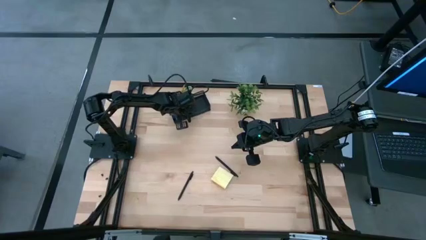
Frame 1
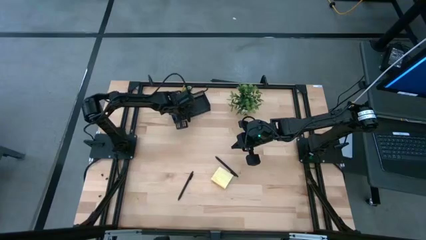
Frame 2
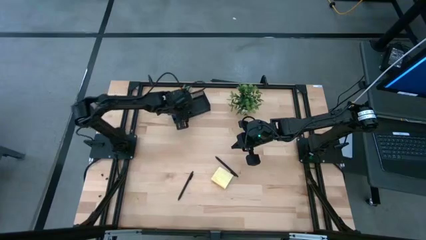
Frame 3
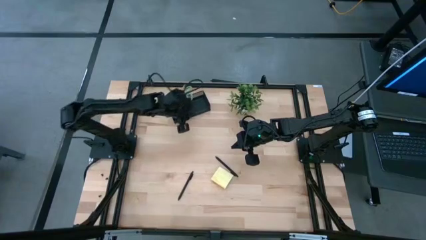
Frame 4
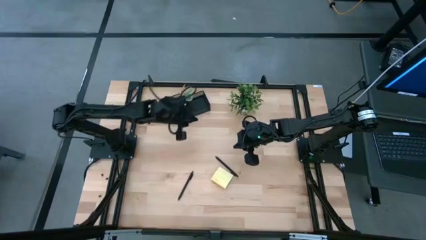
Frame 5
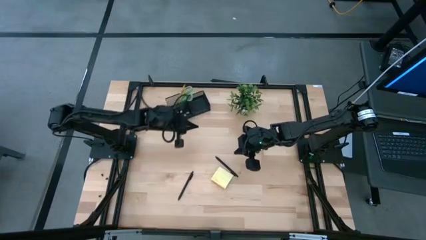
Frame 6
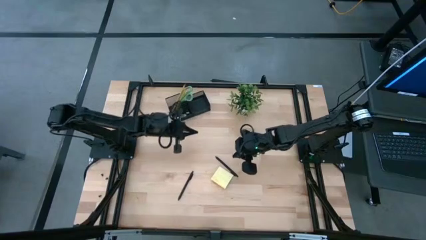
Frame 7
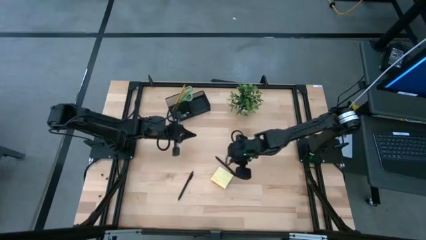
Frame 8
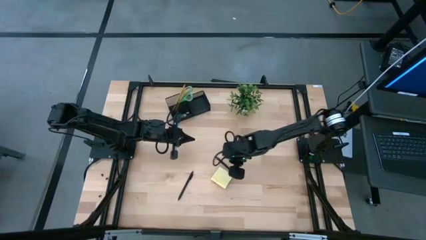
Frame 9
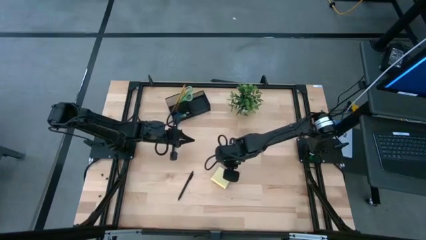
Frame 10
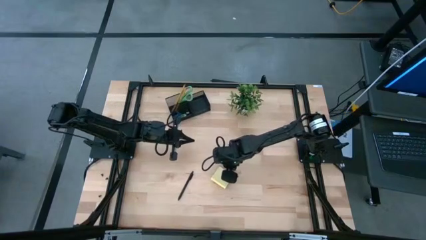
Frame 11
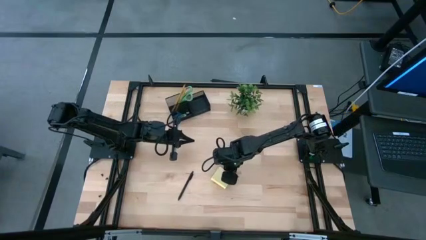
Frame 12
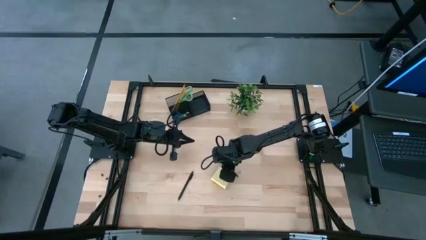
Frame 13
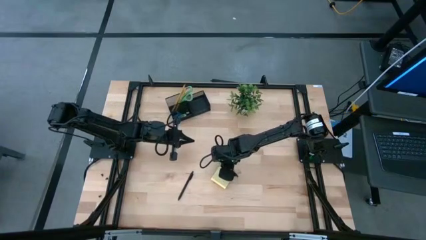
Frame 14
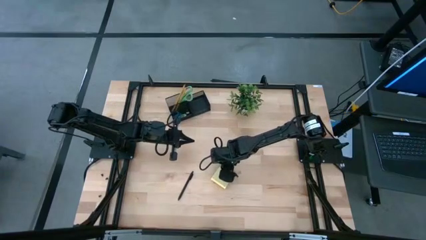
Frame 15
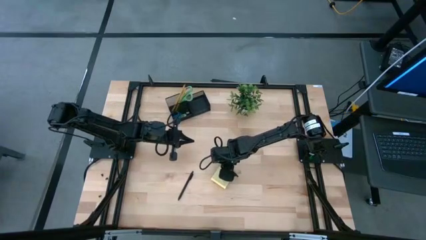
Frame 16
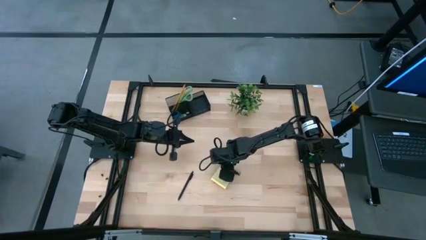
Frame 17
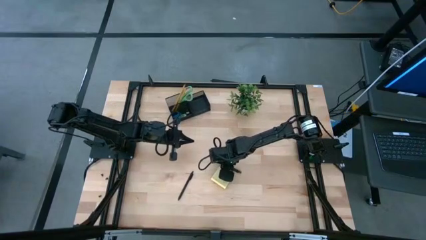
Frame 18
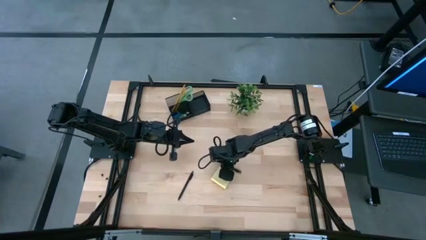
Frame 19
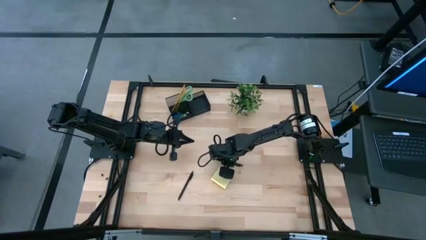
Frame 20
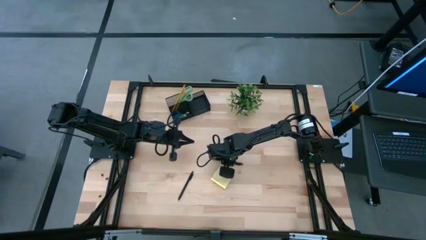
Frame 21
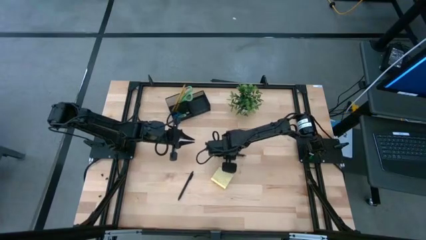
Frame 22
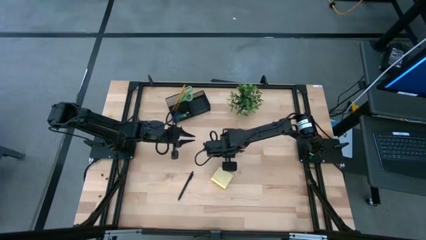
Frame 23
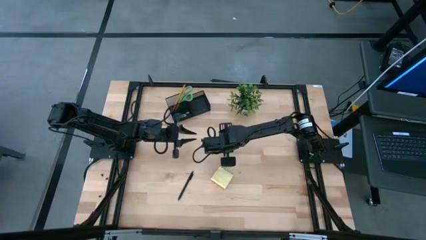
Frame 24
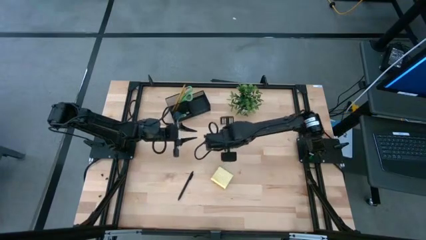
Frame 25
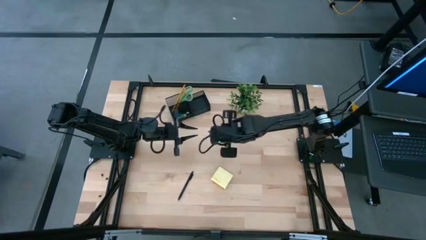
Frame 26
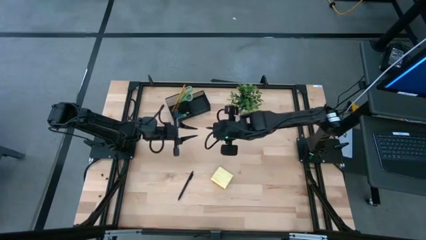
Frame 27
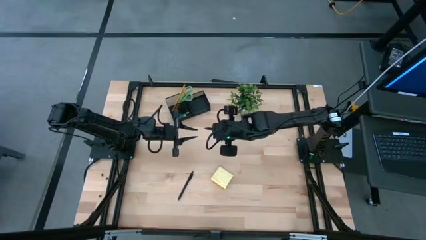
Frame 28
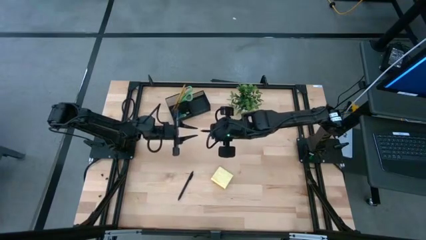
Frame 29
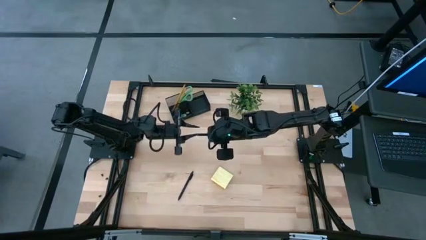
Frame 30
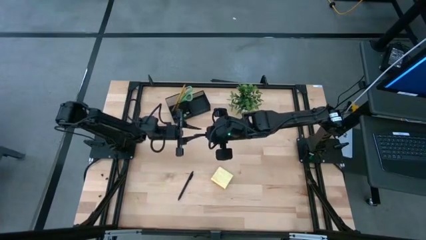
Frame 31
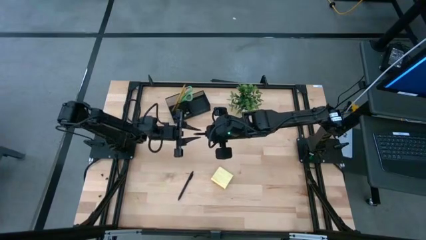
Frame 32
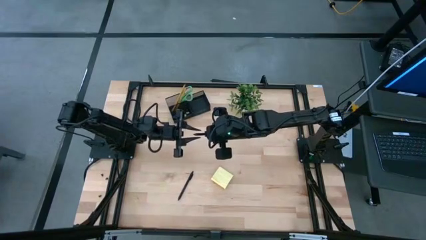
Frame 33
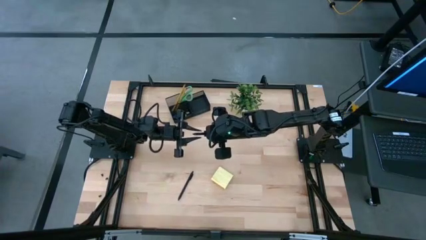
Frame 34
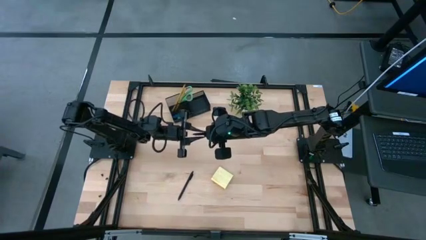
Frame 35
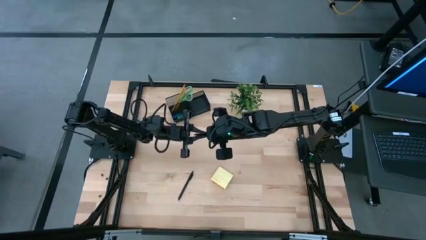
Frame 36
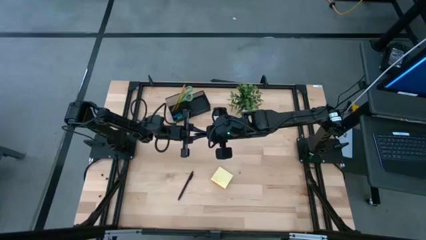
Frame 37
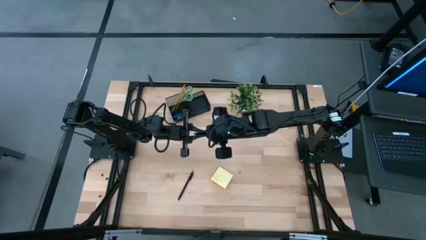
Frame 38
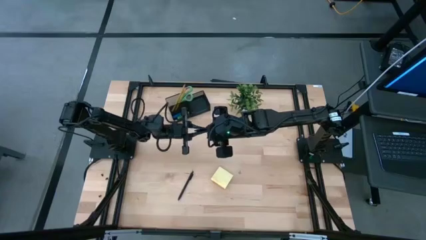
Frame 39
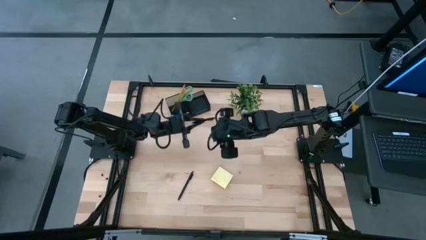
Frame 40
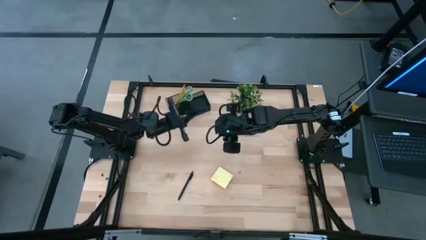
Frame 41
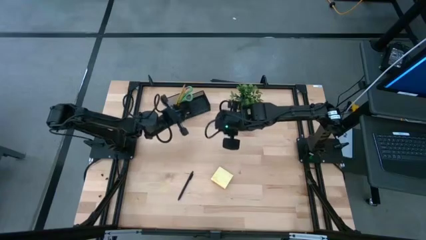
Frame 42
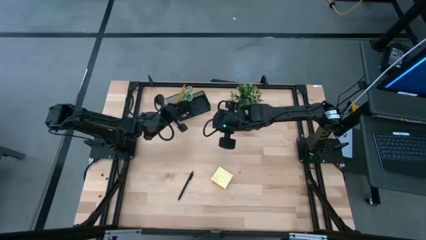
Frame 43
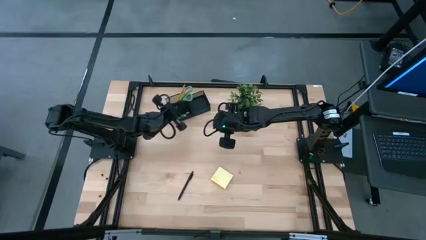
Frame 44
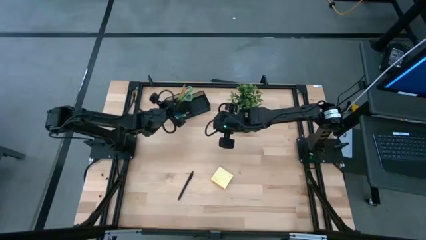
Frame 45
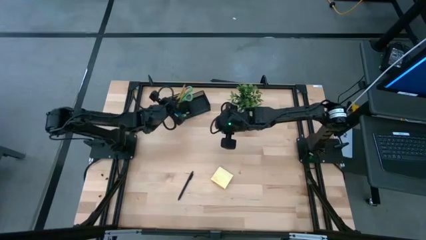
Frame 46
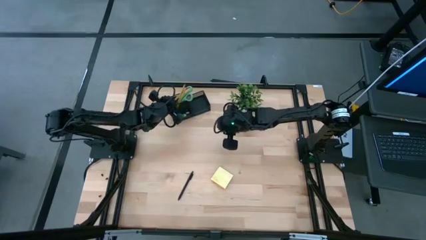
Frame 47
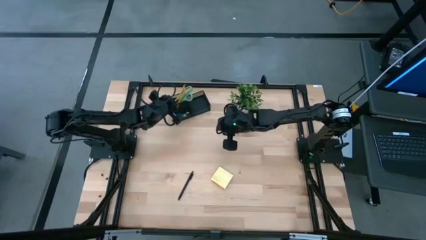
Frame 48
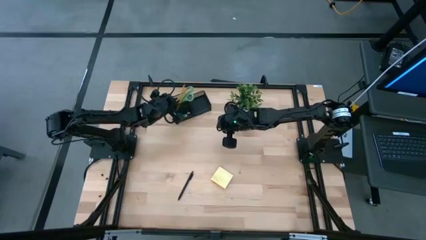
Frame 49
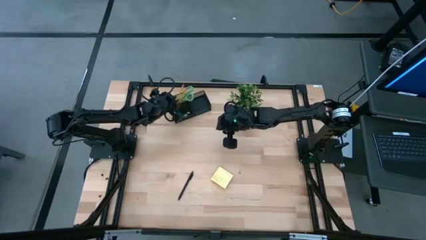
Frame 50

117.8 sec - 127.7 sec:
Task: Pick and place office supplies into organizer
Put the right pen into the desk organizer

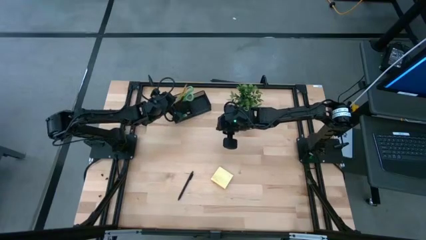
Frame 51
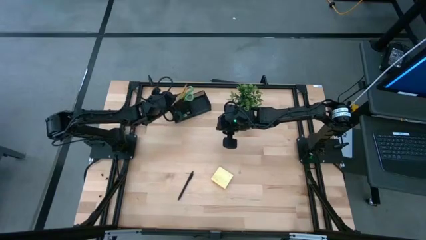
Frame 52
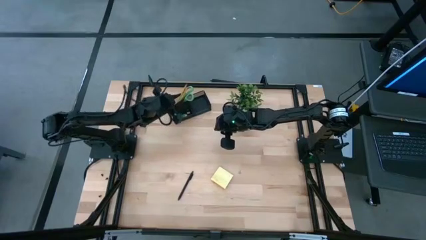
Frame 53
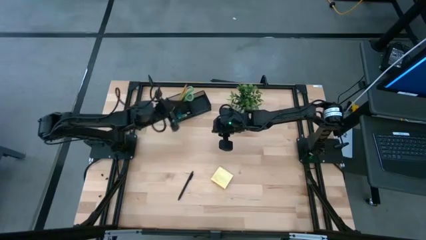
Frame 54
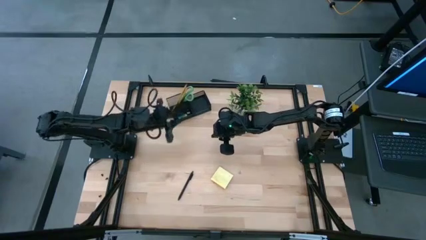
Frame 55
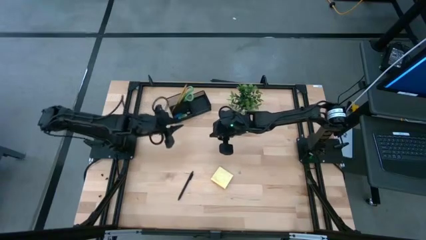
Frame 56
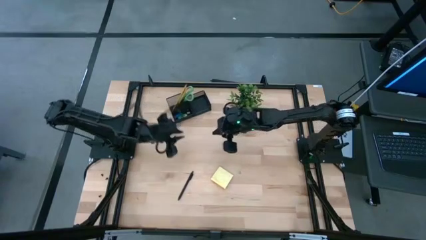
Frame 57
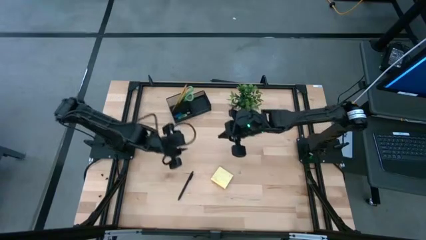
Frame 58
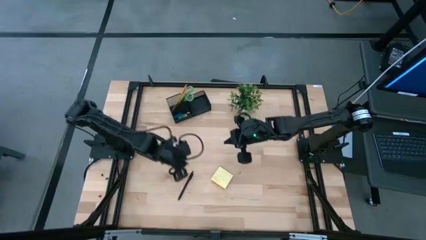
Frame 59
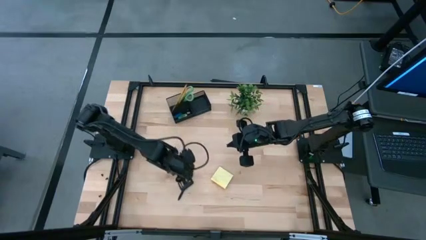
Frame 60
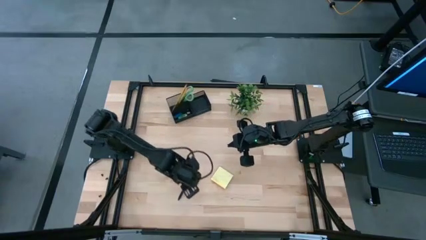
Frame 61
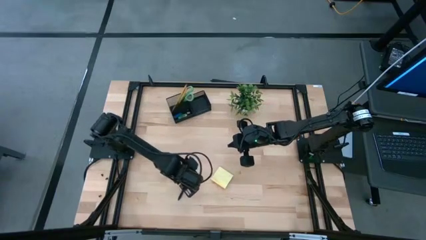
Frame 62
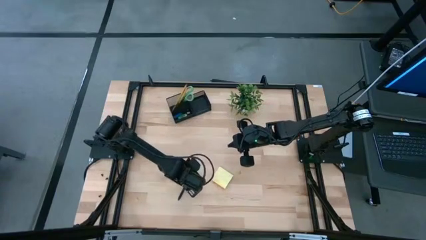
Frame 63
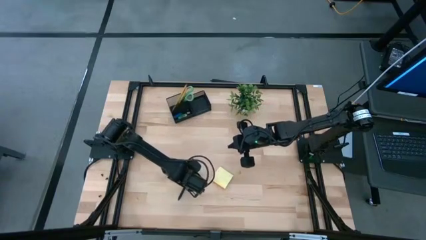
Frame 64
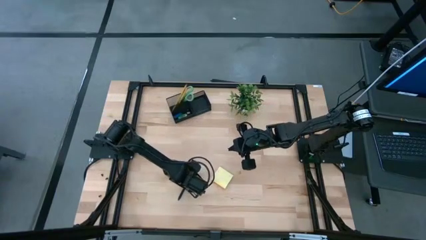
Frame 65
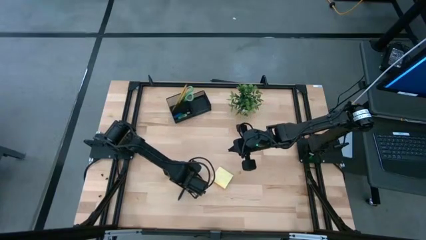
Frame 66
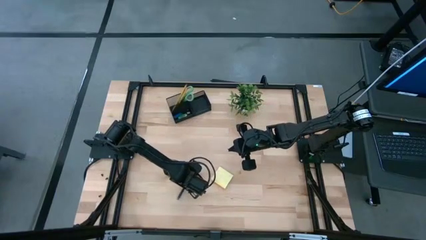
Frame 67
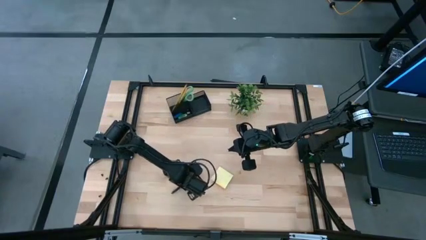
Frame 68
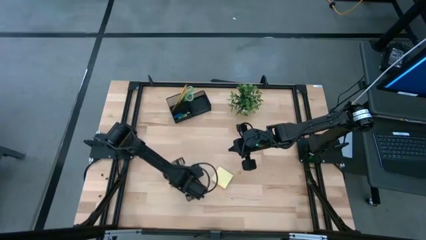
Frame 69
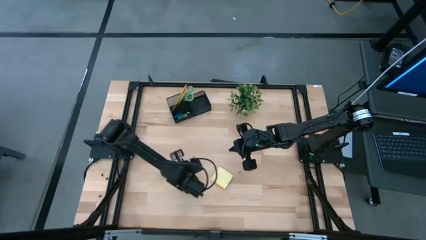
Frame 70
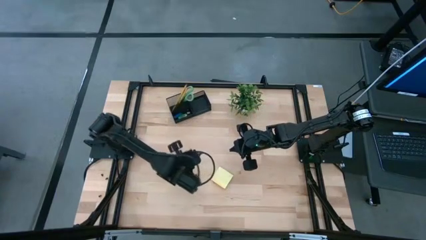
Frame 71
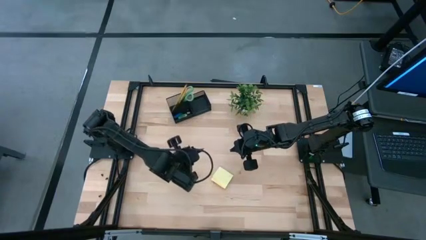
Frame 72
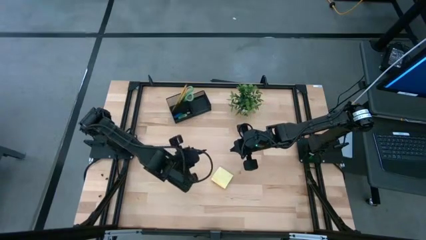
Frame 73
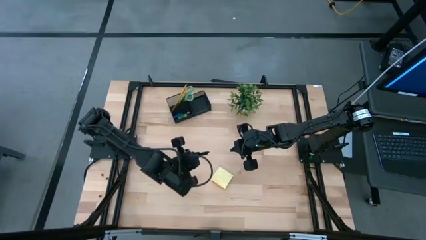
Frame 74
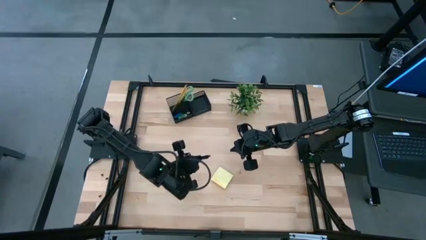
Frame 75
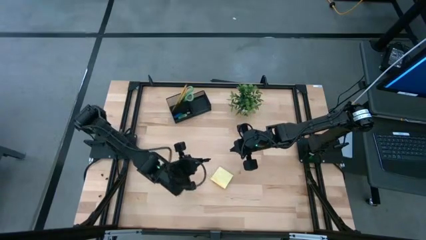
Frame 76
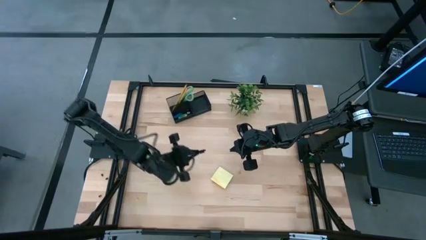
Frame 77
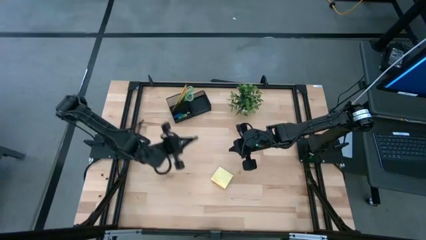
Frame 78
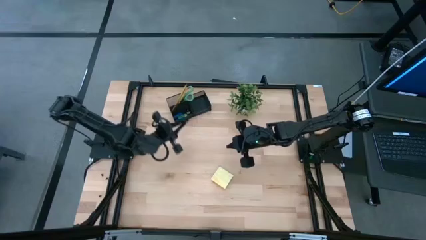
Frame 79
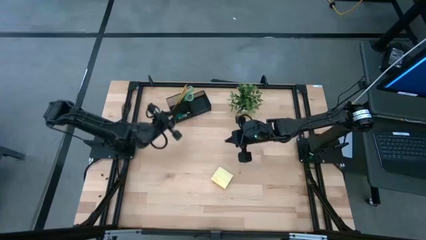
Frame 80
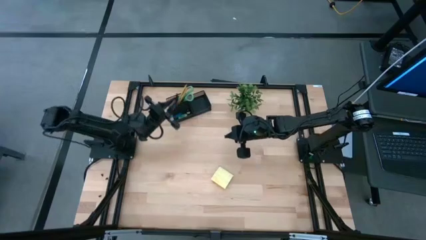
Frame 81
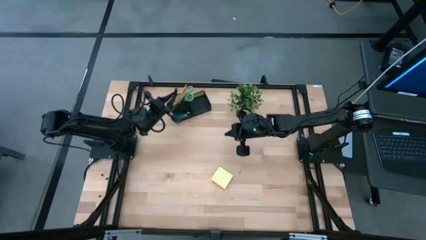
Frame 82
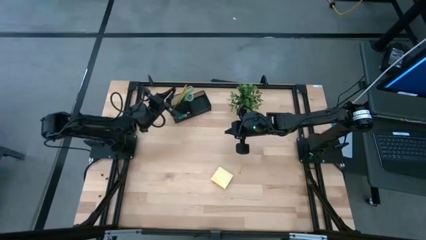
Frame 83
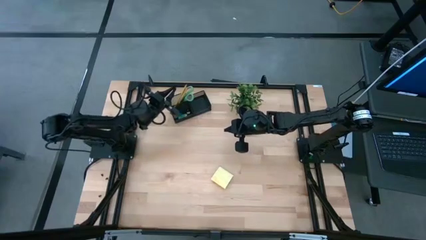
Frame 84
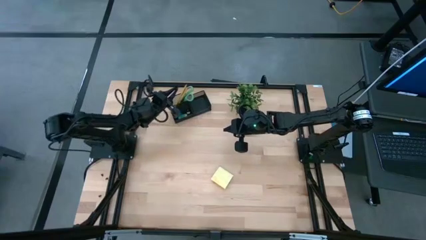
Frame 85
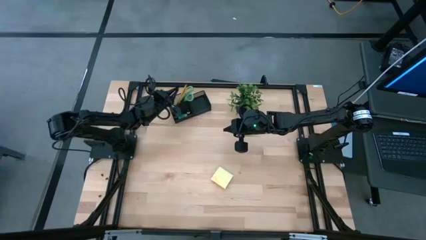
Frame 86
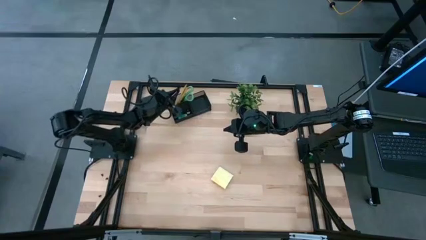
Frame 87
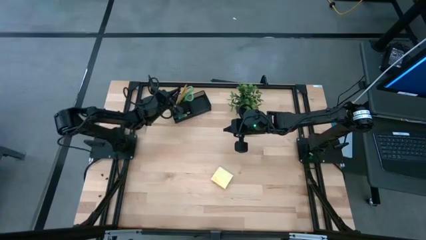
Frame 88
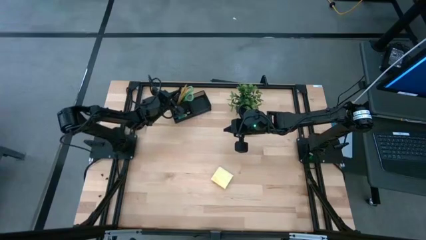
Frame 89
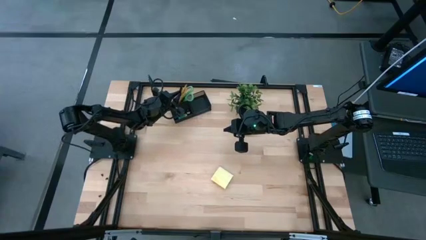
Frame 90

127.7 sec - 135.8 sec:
Put the pen into the desk organizer
